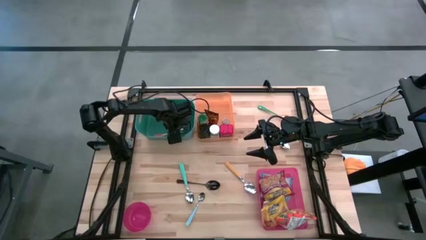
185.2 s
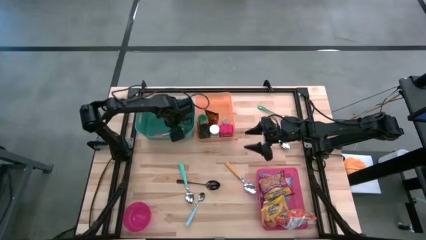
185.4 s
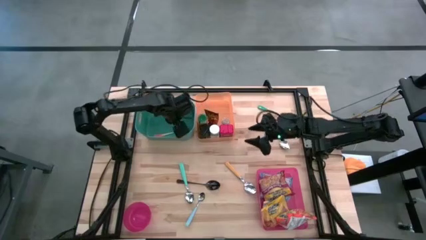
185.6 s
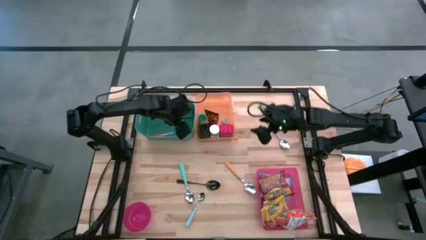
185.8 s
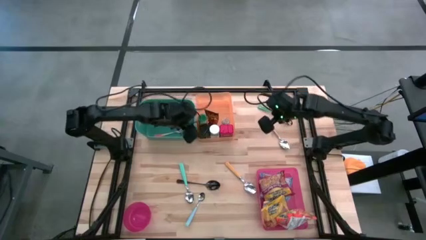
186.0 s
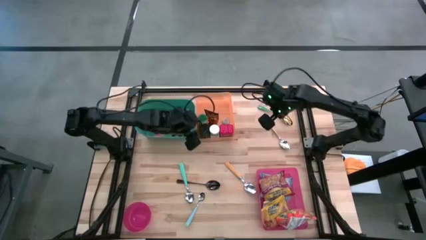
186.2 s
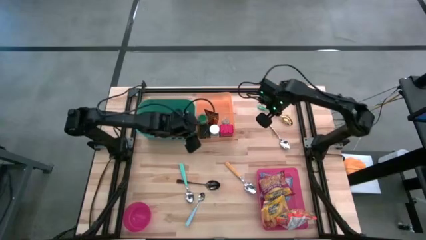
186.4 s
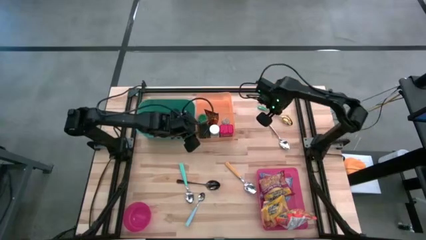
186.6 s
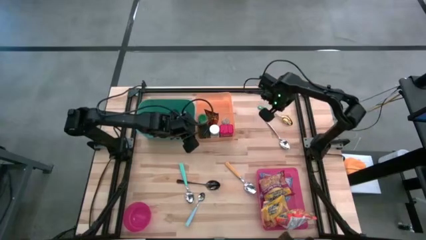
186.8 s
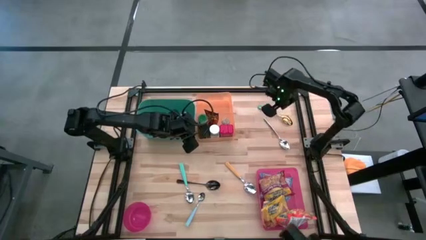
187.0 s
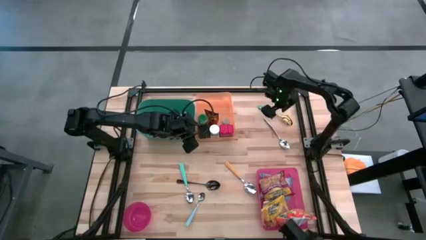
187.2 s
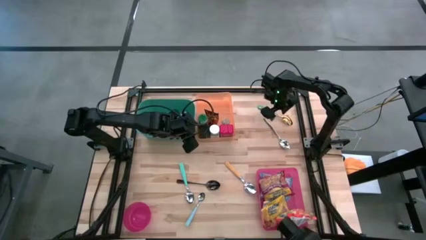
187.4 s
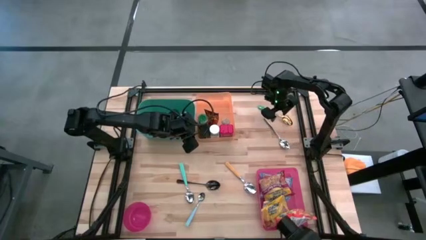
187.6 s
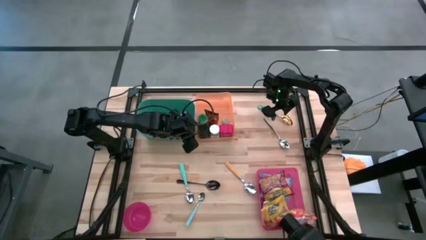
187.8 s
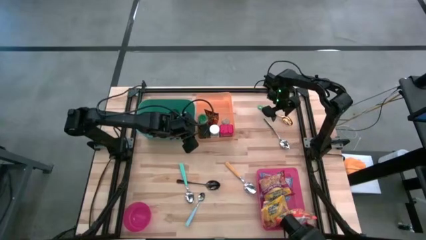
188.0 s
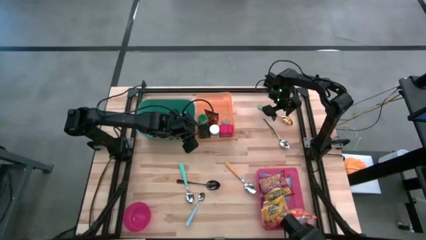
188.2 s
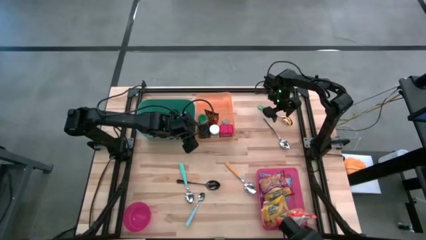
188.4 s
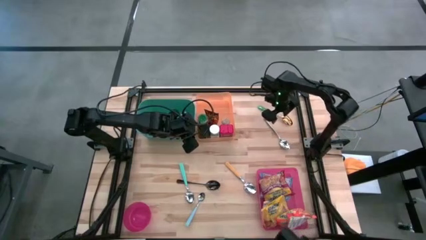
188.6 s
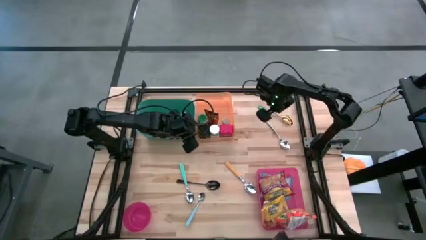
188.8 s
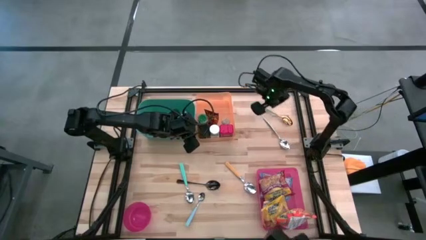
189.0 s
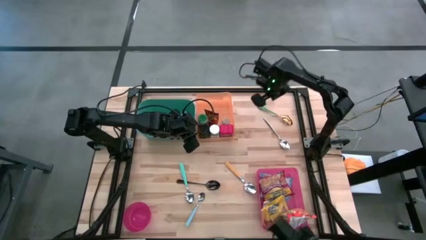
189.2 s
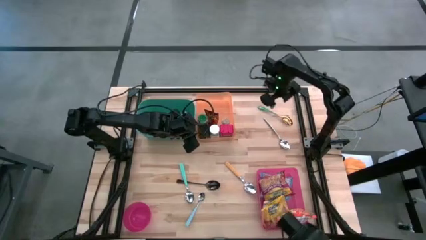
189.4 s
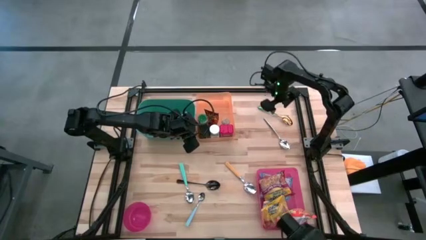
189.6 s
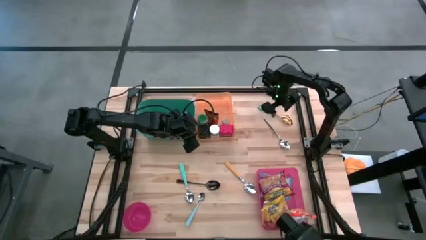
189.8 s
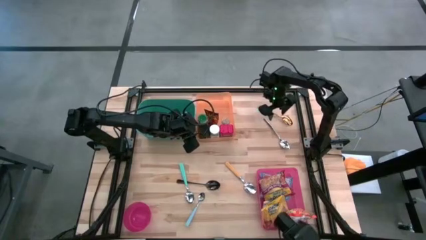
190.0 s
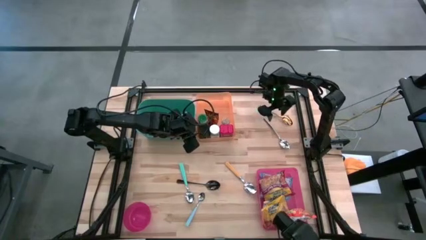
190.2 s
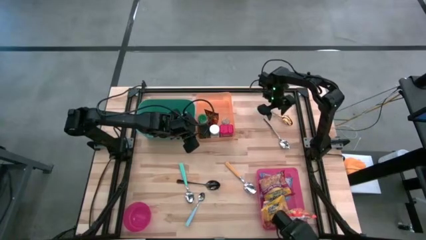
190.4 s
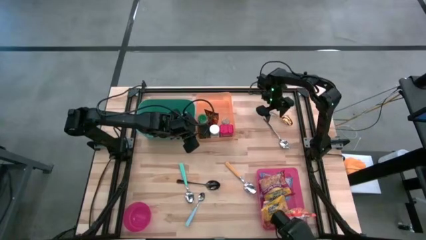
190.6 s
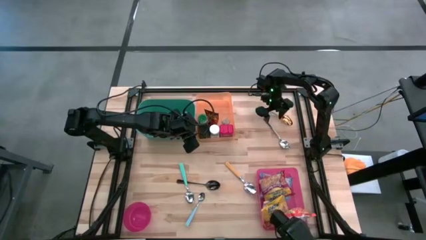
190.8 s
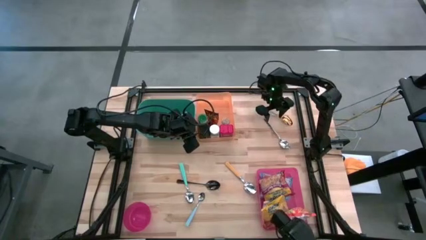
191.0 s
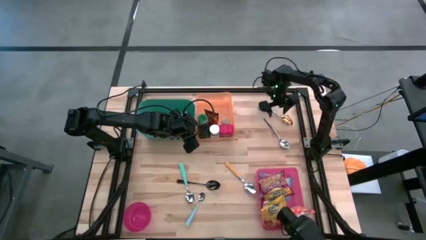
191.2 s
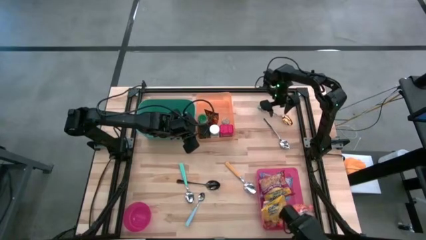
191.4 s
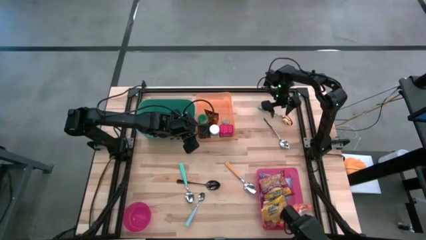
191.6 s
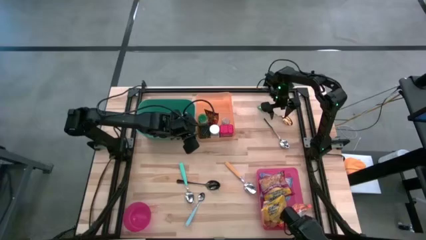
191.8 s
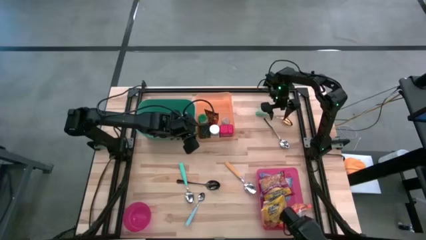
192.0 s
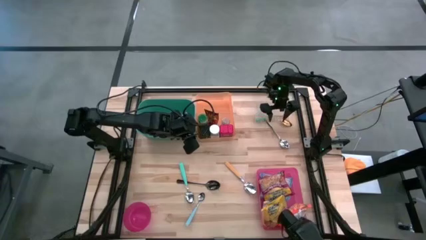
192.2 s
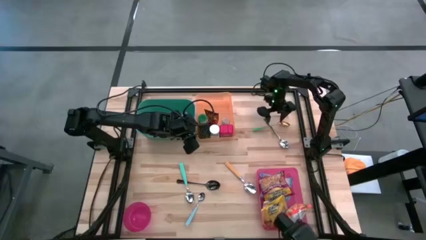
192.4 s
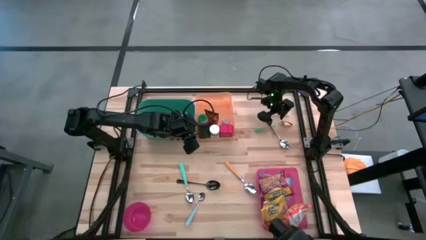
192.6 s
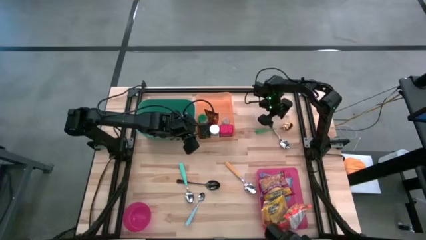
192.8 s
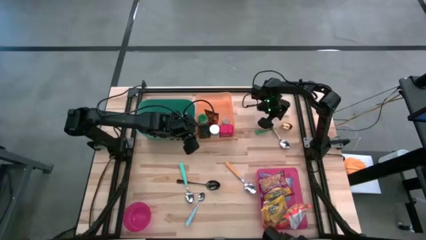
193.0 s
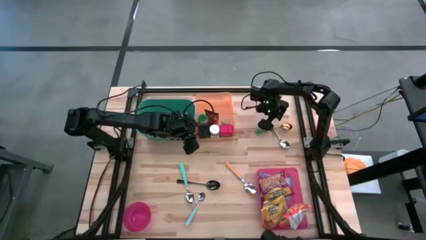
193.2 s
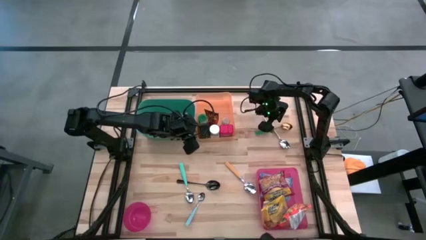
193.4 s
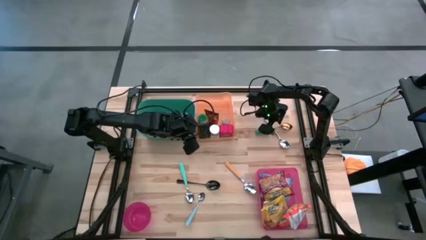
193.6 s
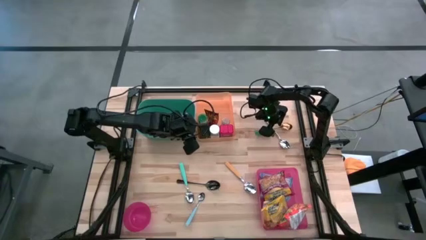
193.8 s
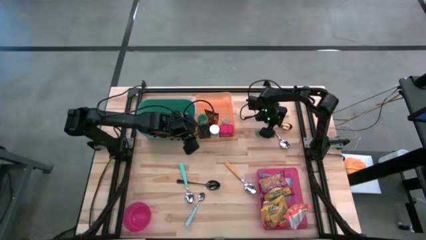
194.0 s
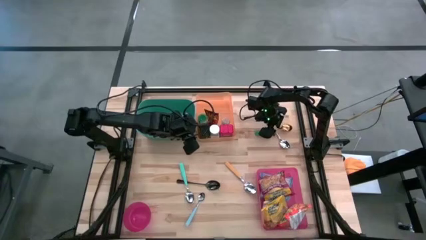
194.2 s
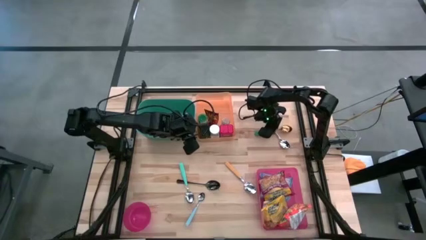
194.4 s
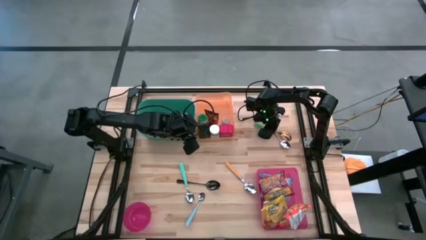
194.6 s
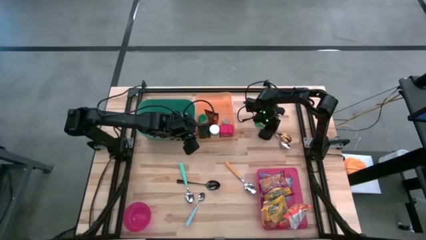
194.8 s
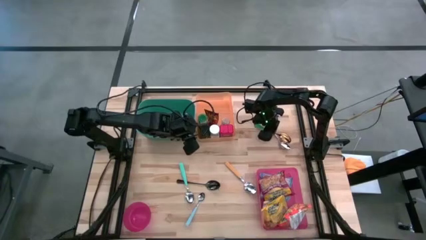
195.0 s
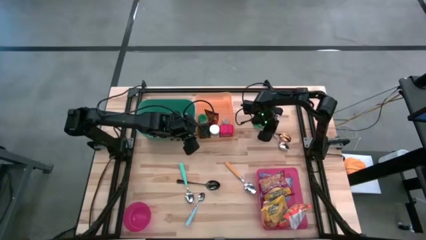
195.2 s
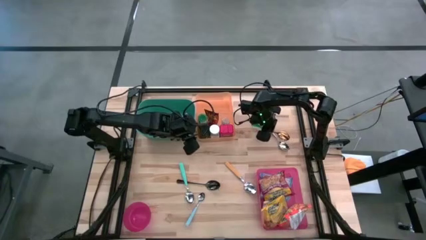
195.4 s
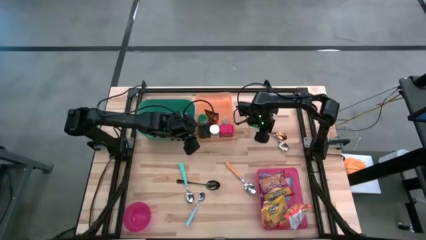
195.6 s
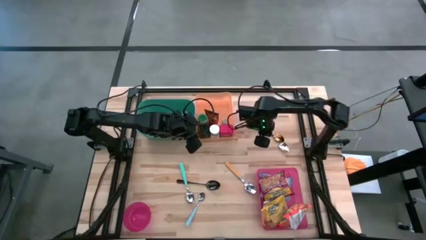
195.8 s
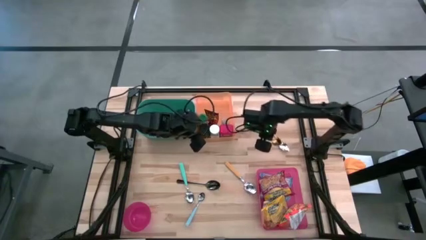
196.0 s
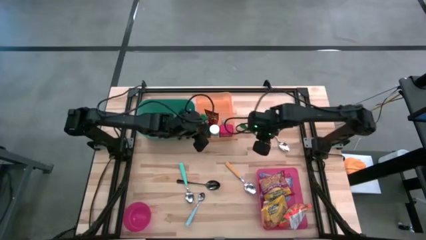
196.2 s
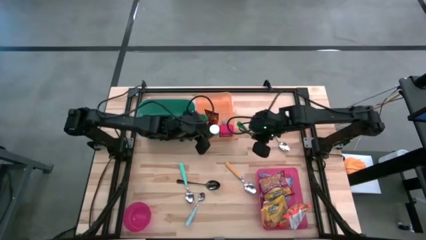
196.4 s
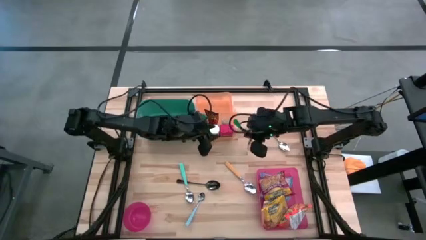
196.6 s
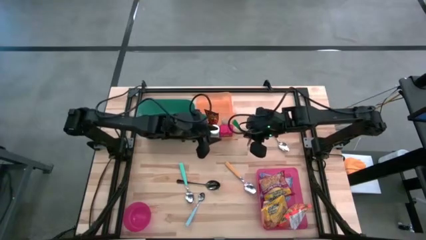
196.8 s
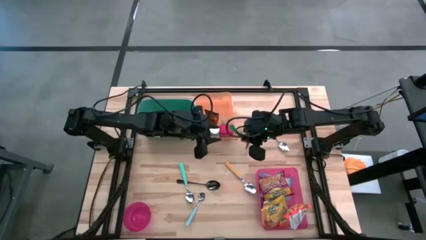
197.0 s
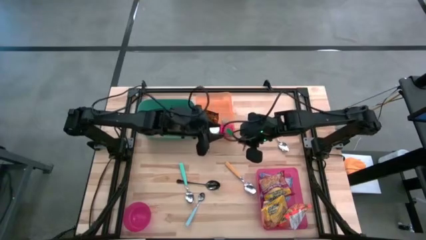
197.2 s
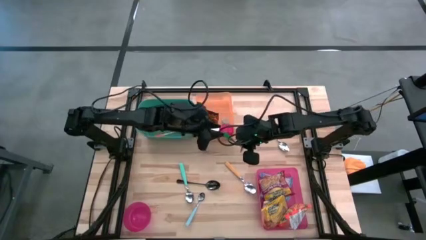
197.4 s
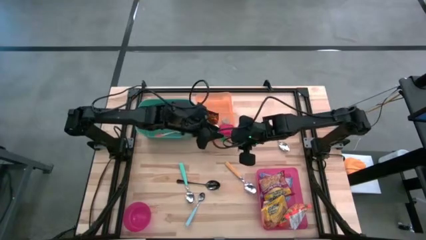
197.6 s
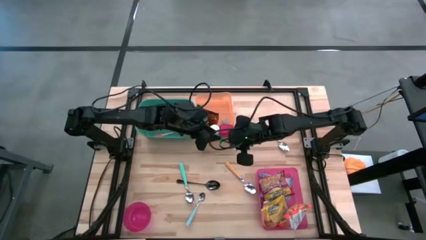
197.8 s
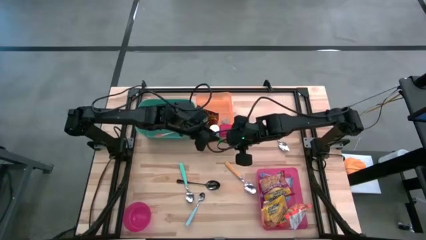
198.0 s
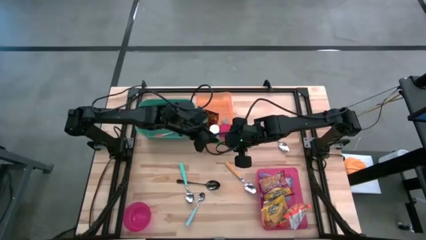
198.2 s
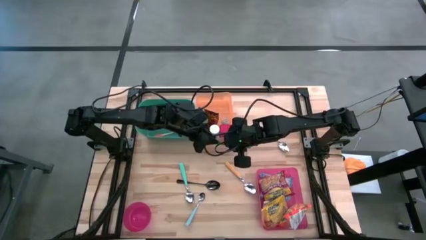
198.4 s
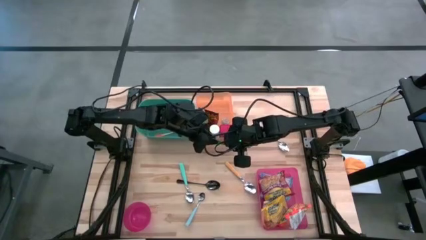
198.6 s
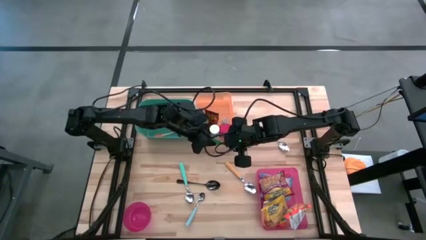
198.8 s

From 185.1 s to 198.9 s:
Put the green spoon into the green bin
